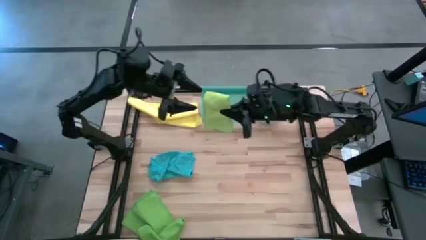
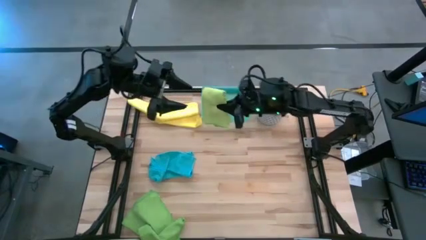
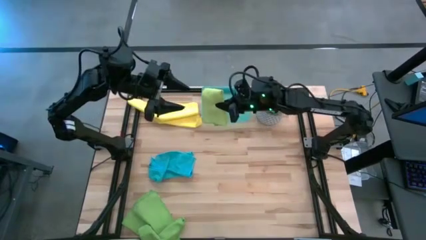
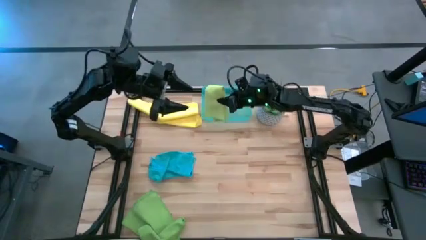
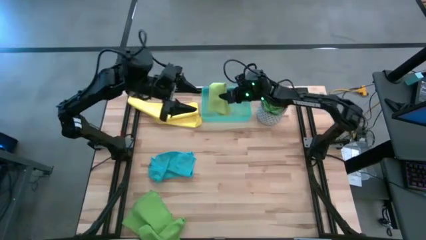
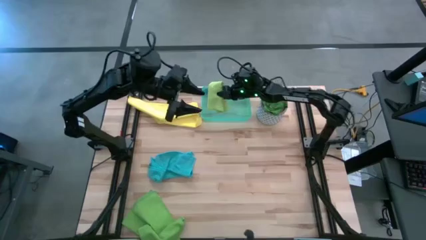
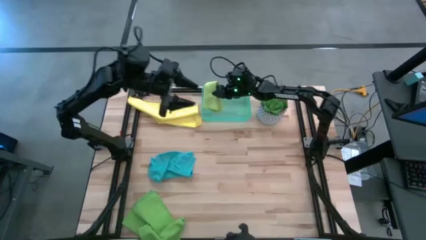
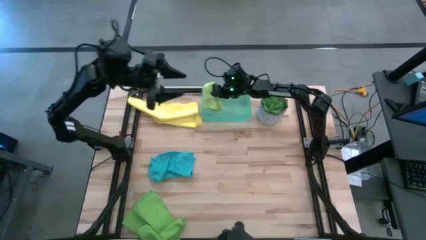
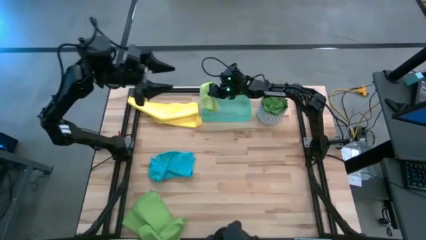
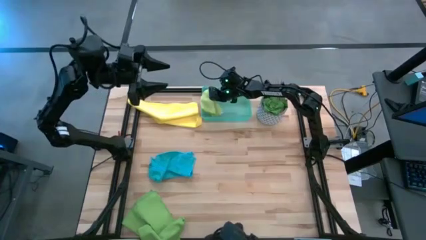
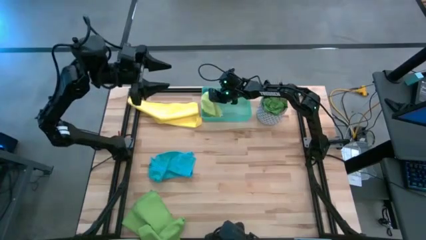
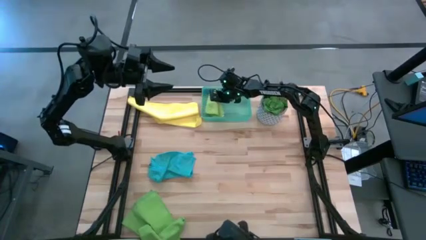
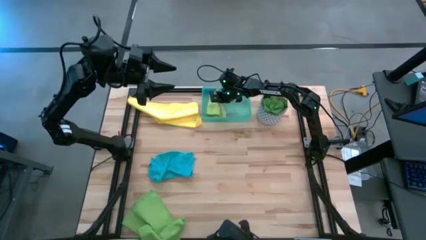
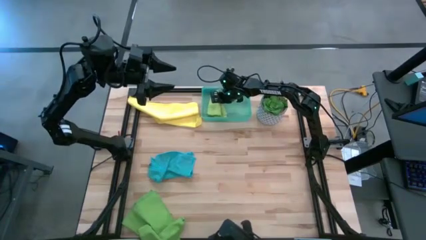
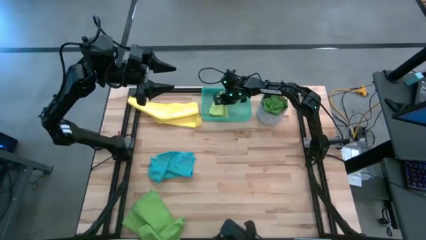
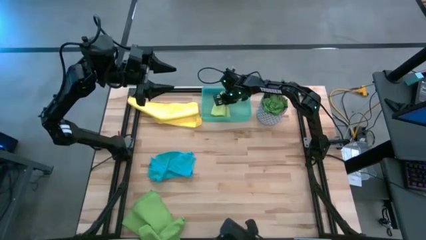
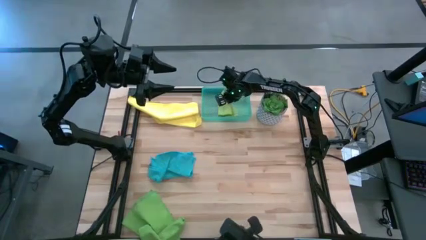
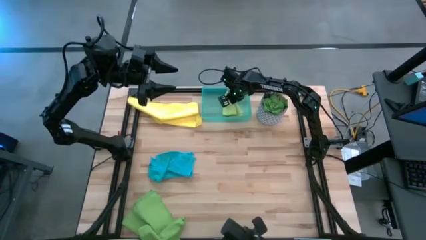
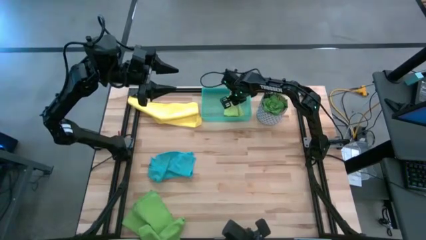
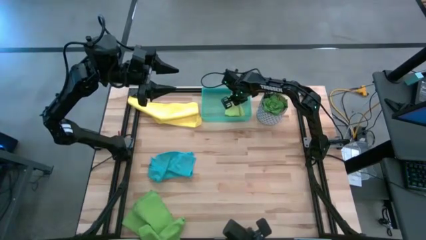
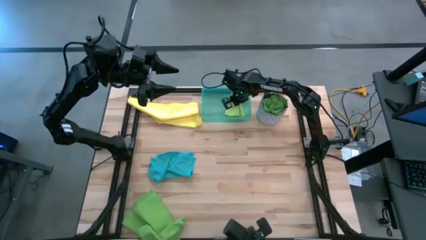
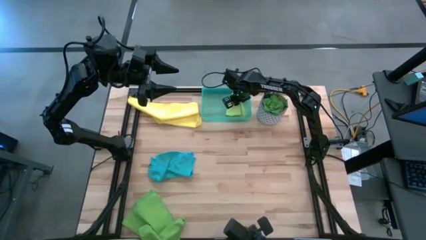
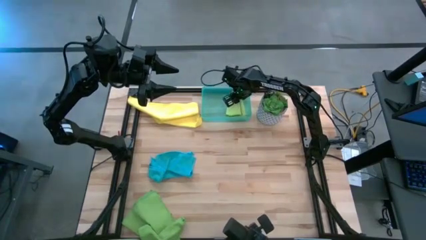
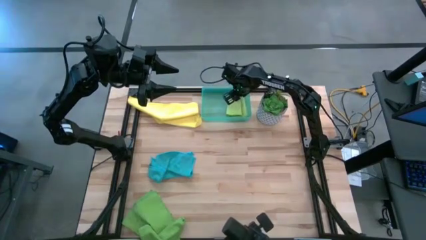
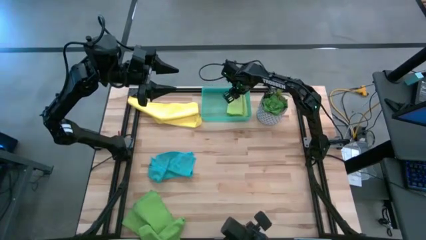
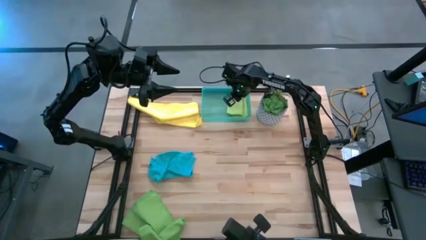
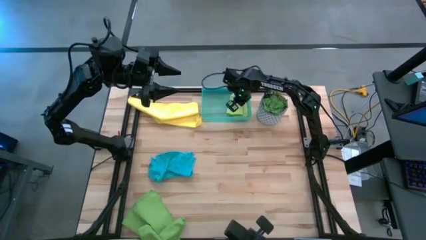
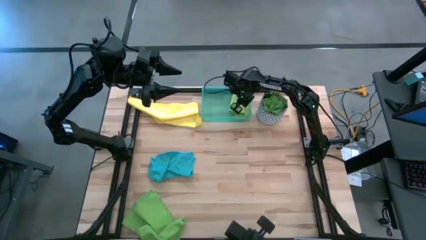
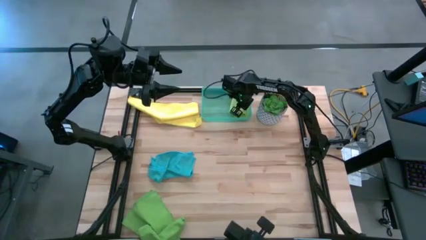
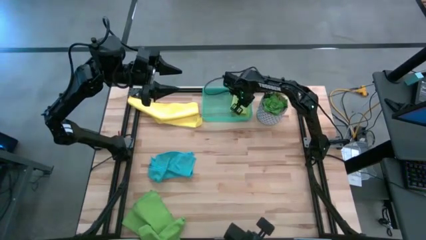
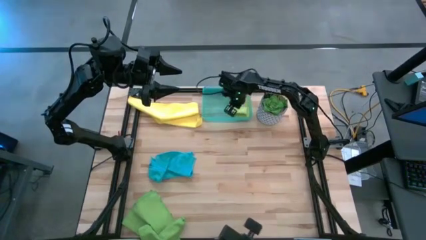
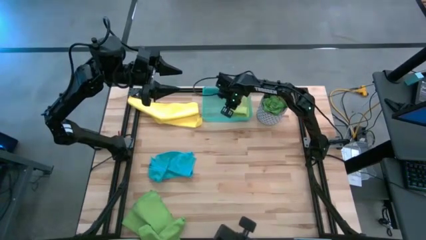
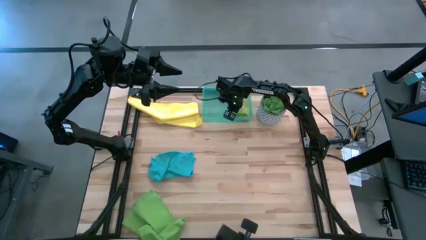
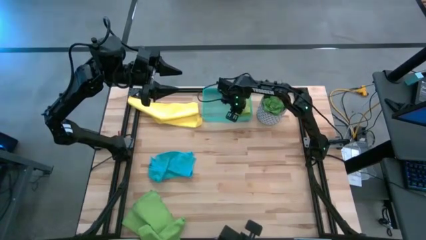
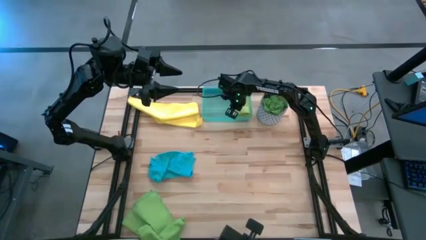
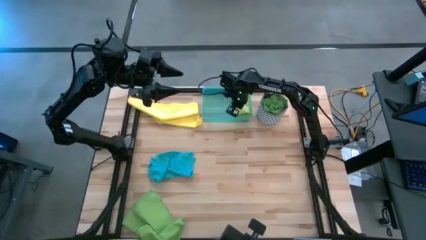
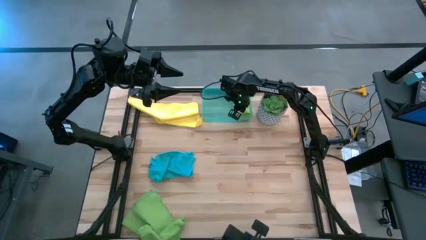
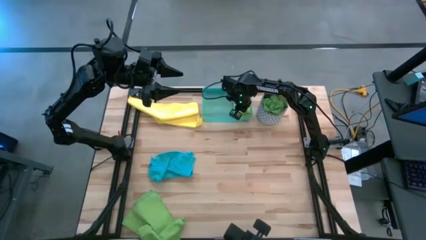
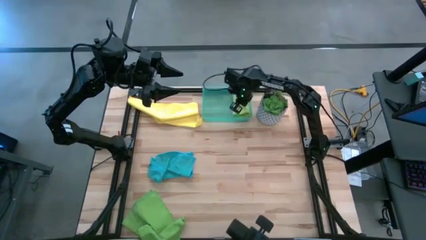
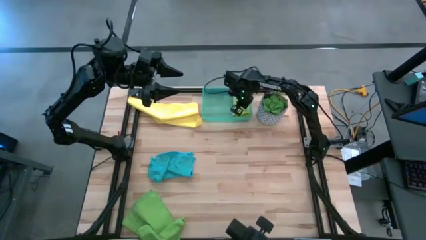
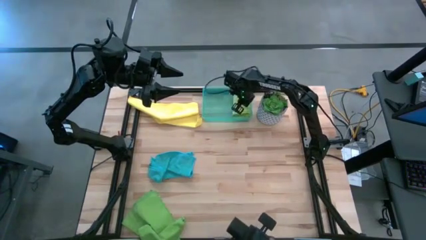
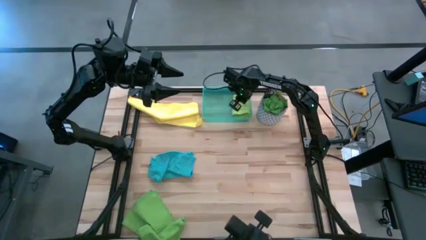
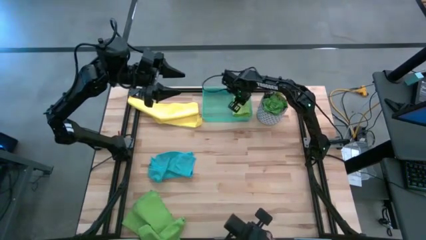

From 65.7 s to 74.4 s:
Task: Fold microfiber towels
Put the light green microfiber cloth into the blue bin

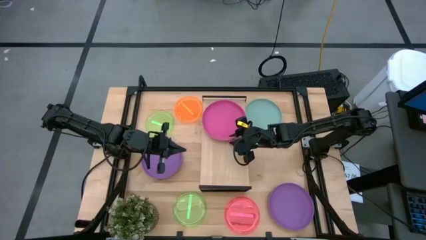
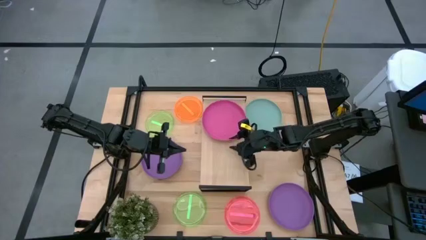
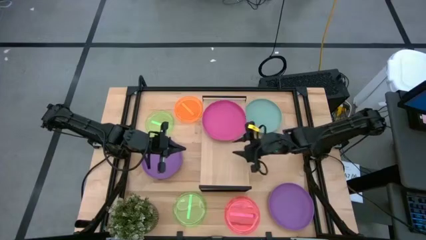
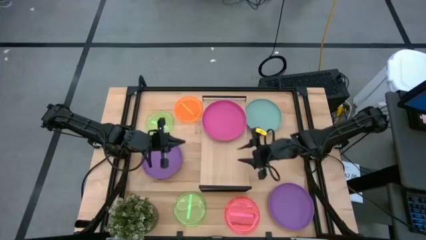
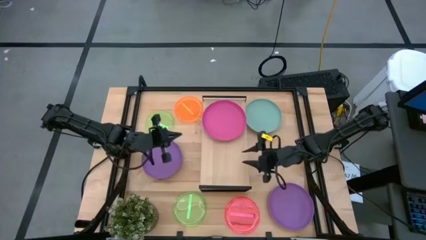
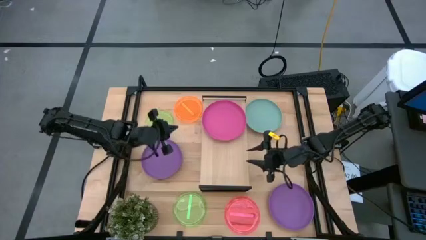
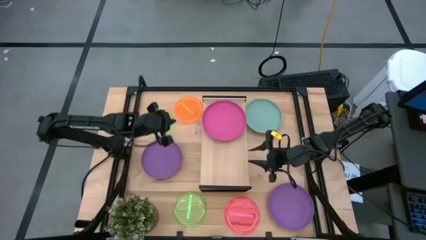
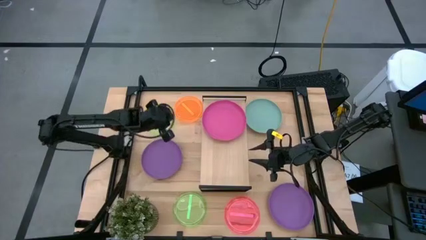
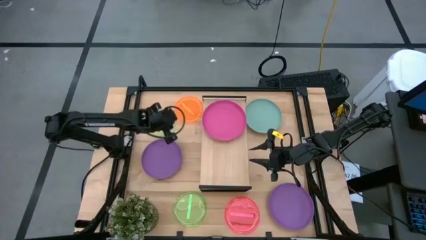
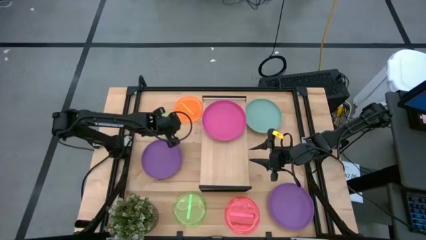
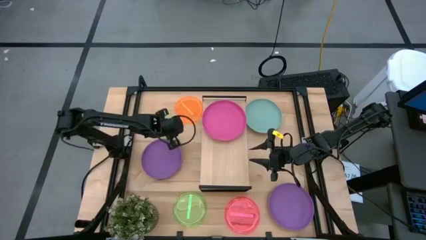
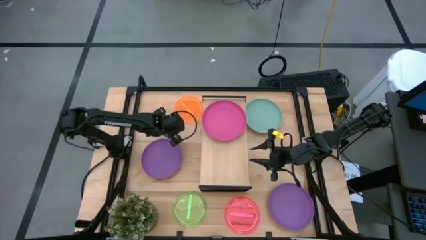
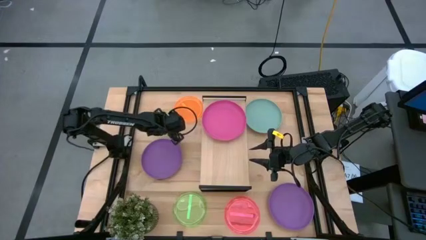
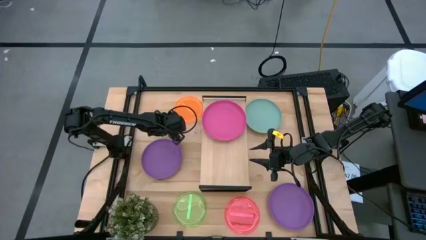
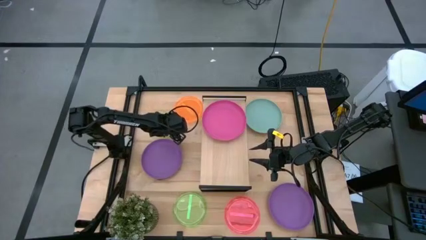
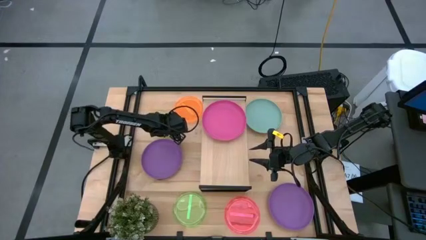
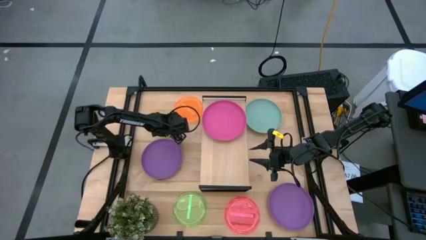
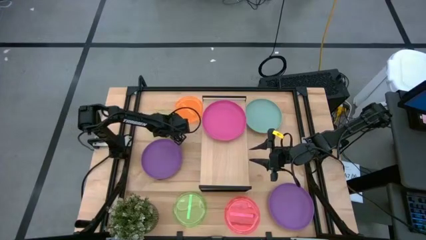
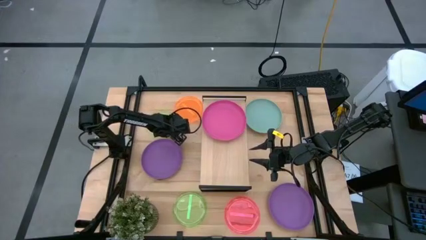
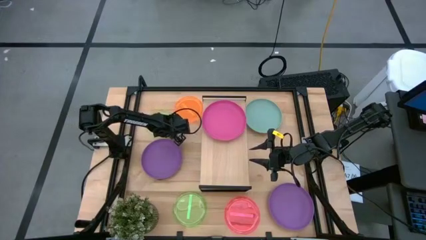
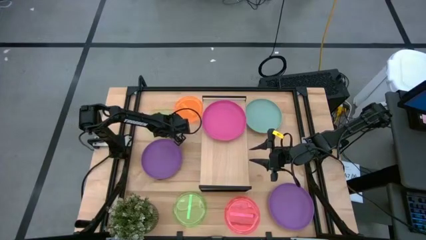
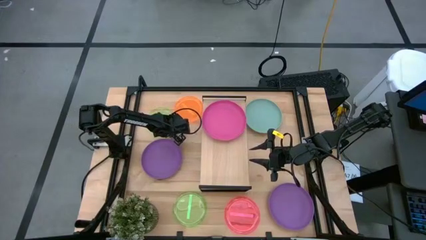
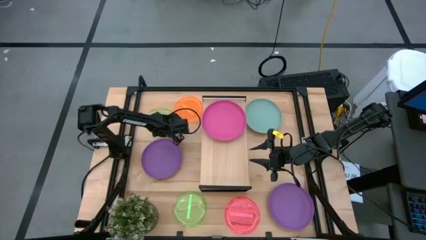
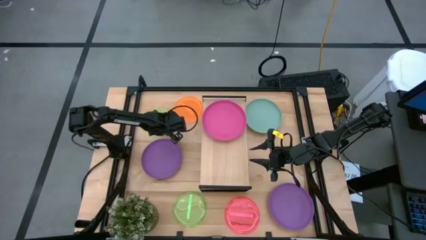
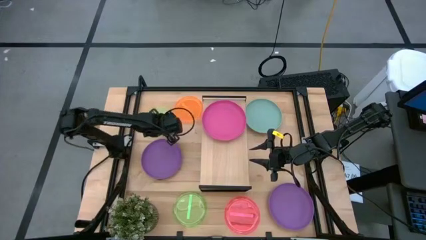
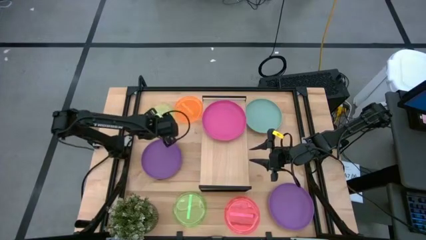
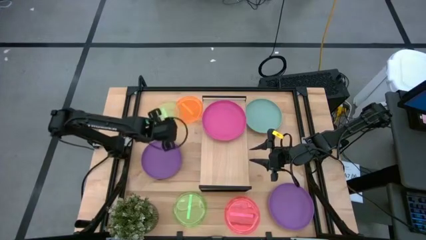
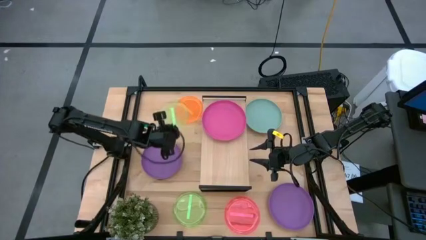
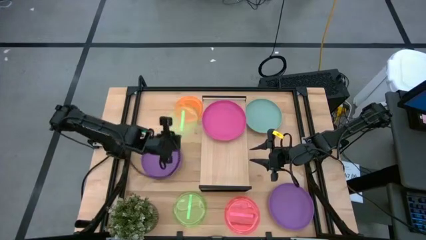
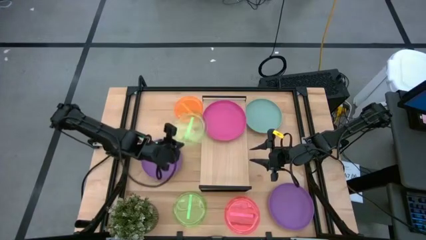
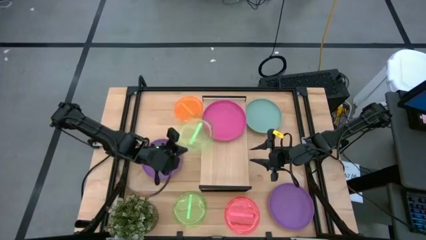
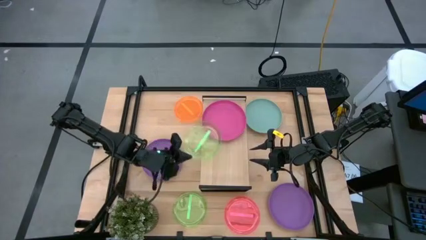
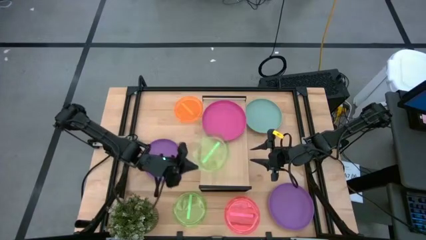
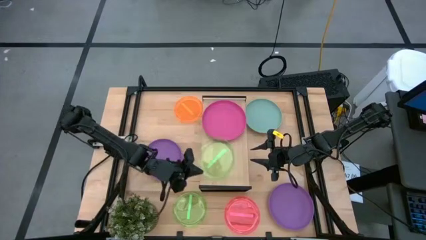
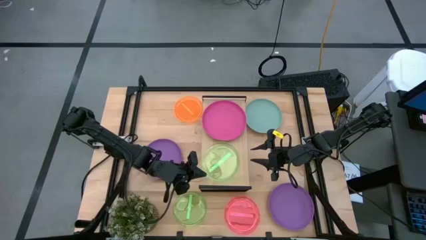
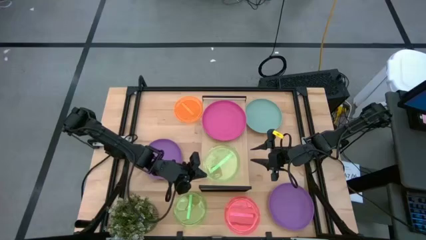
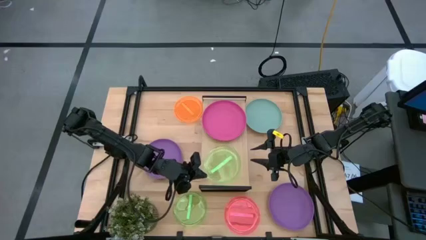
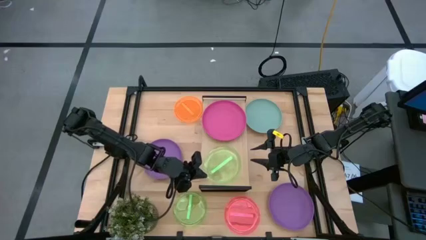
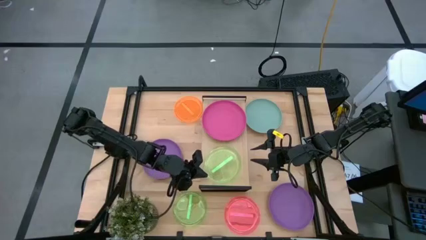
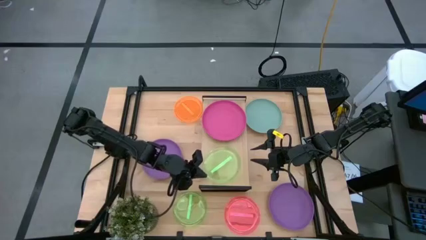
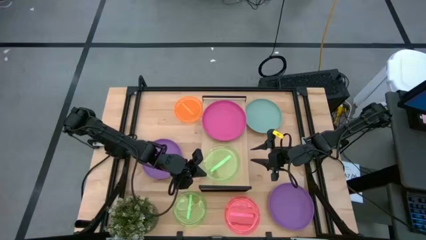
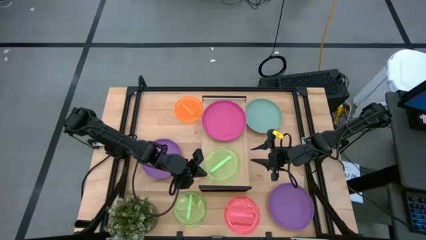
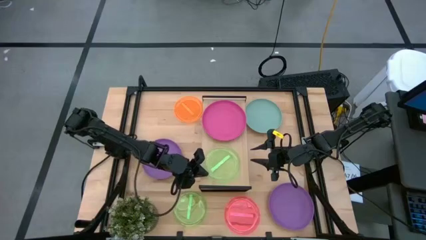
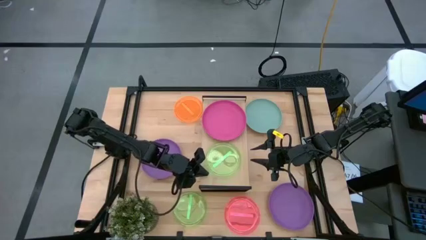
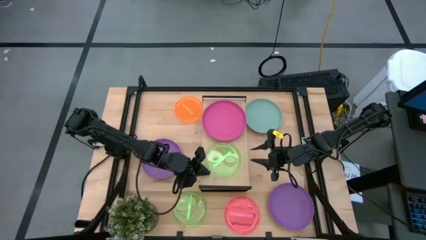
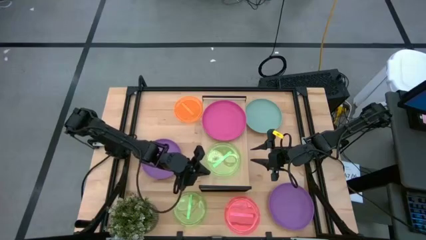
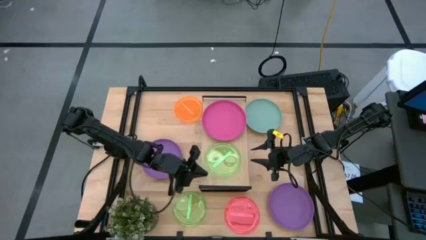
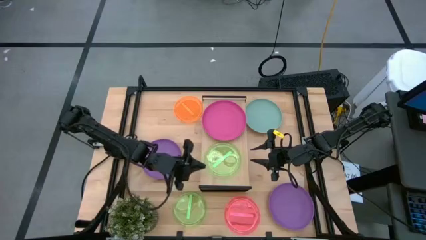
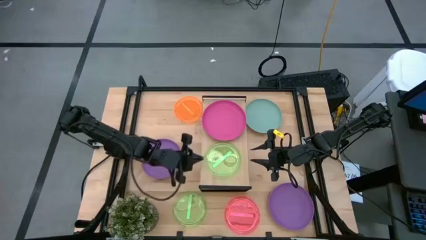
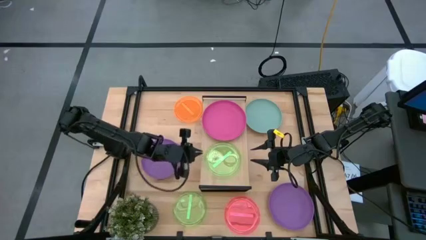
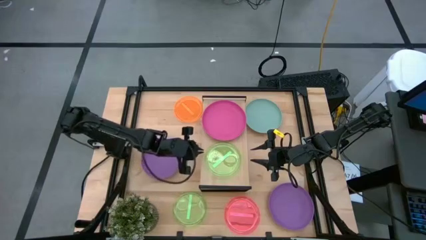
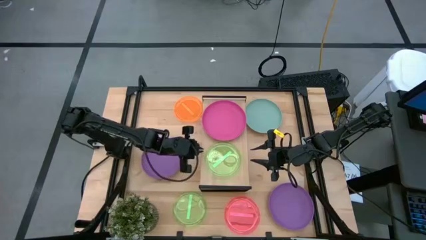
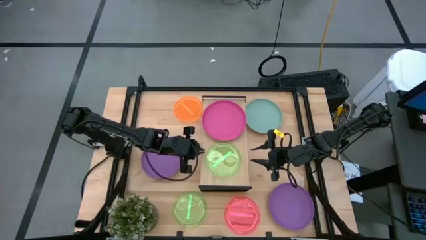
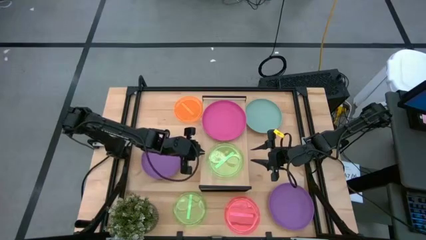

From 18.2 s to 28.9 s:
Task: Place and stack plates onto a shelf
Put the transparent green plate on the shelf
